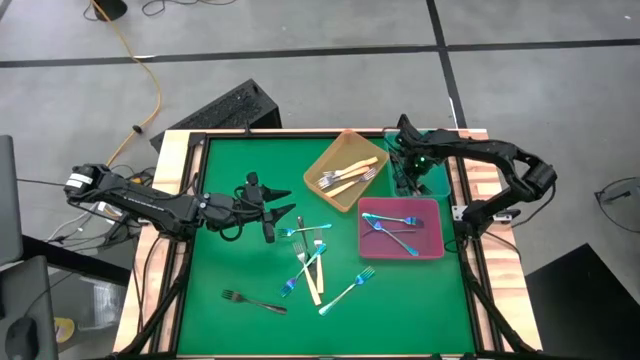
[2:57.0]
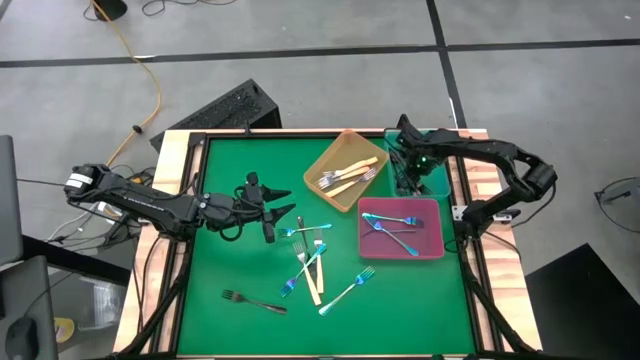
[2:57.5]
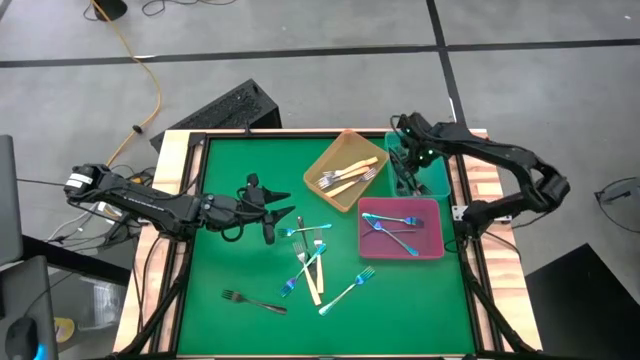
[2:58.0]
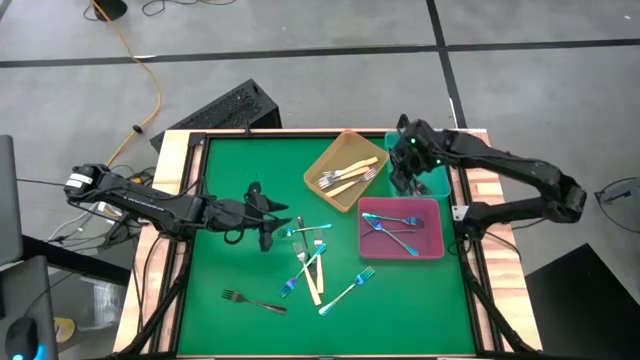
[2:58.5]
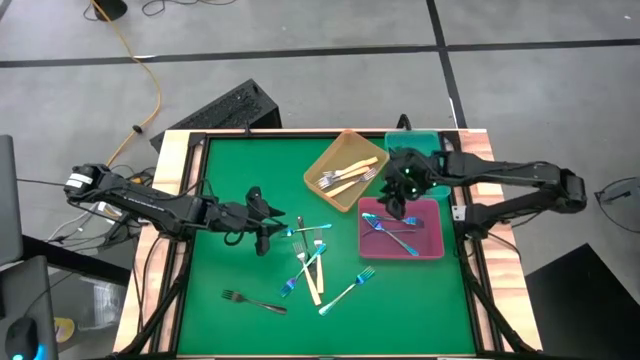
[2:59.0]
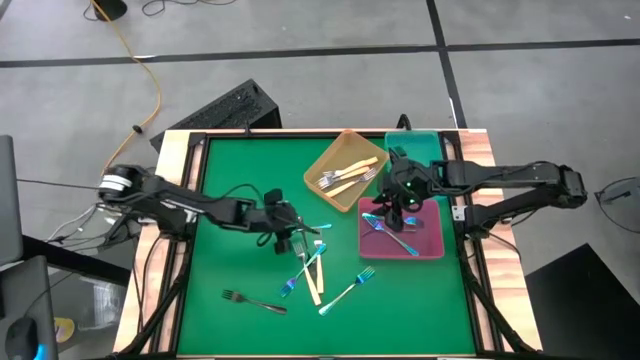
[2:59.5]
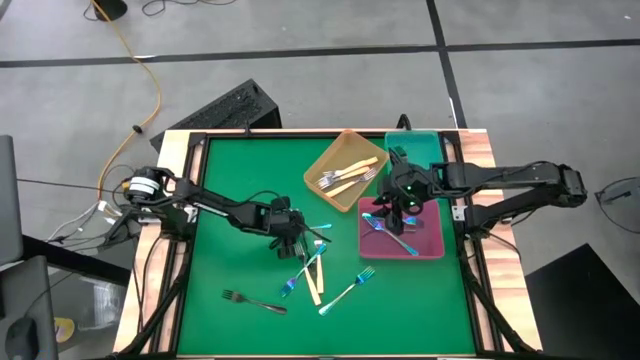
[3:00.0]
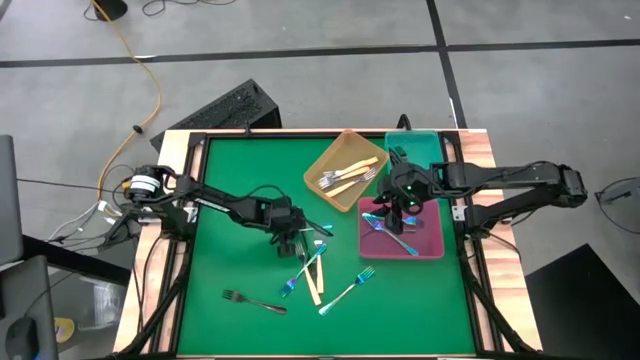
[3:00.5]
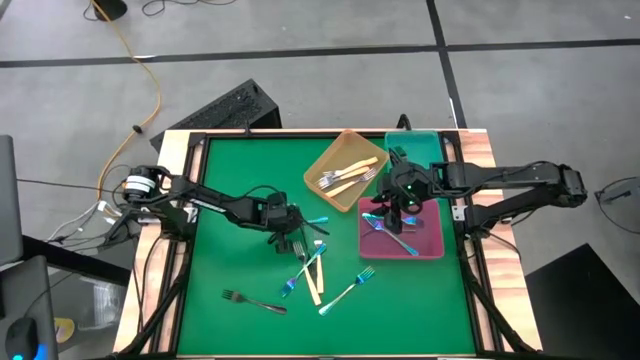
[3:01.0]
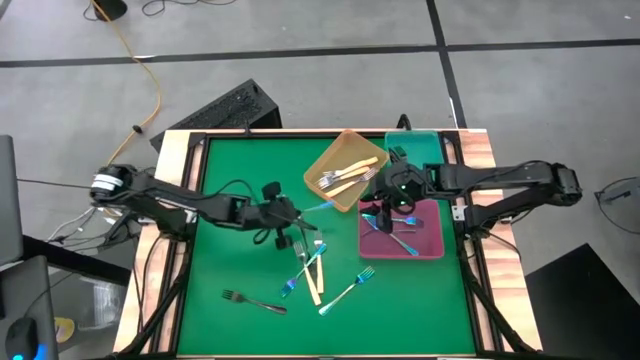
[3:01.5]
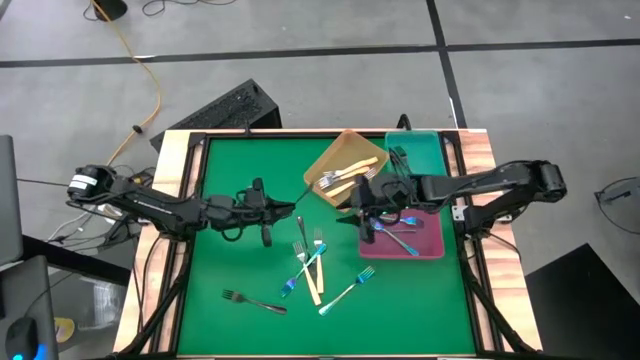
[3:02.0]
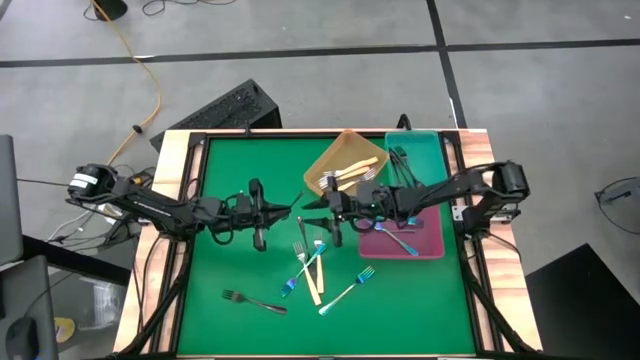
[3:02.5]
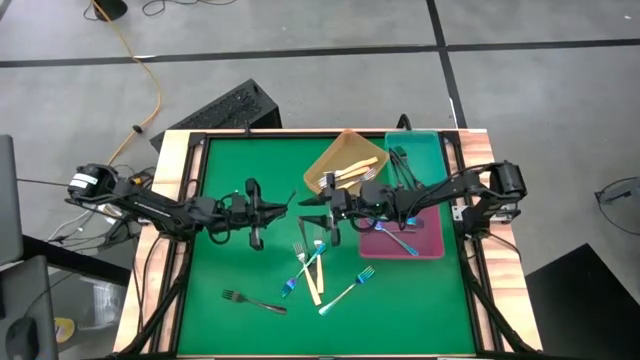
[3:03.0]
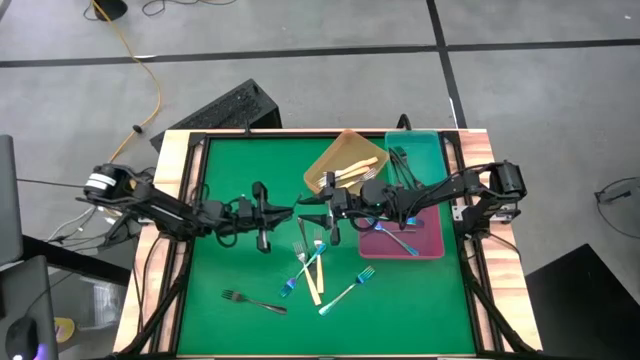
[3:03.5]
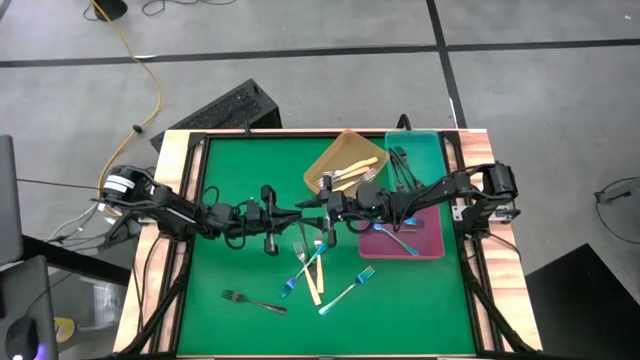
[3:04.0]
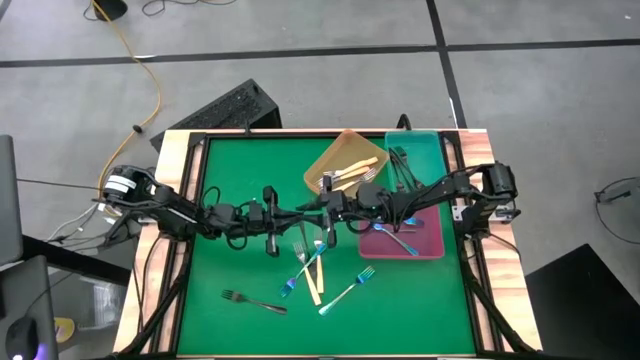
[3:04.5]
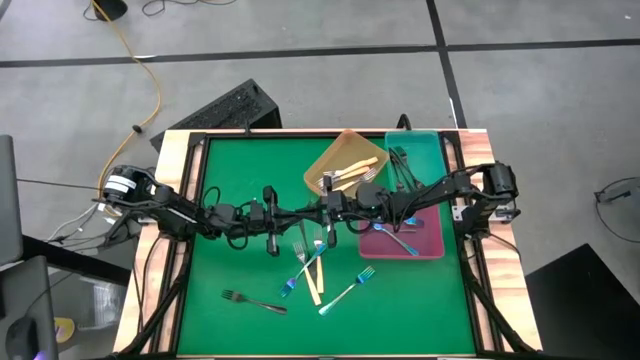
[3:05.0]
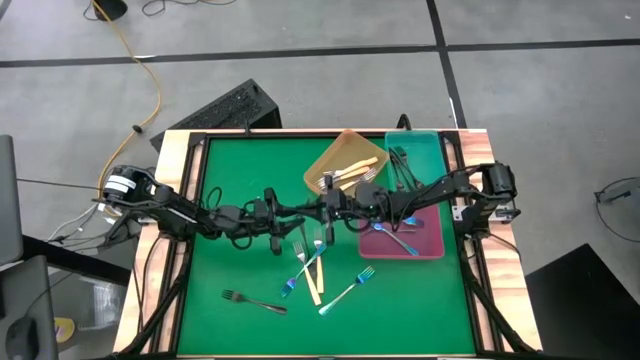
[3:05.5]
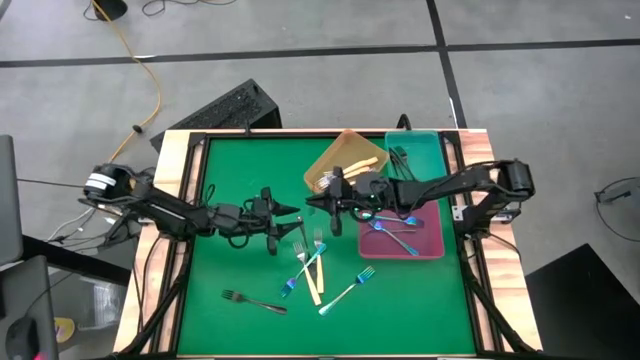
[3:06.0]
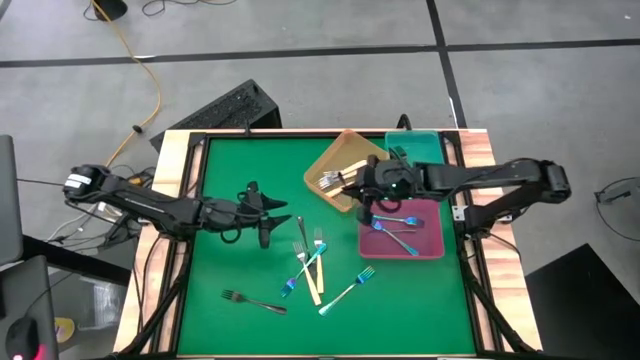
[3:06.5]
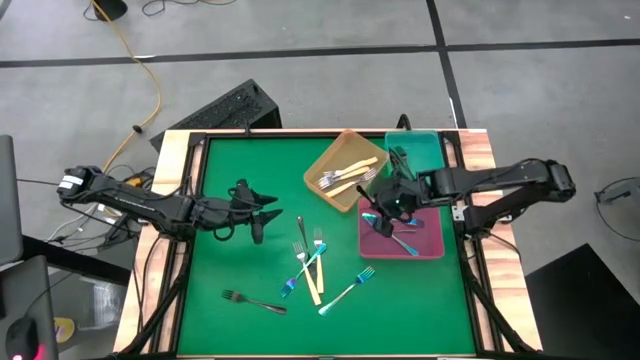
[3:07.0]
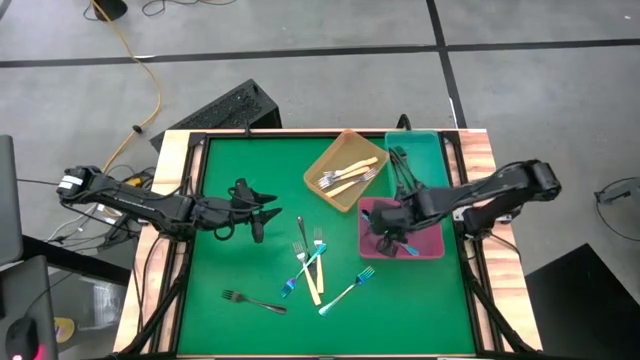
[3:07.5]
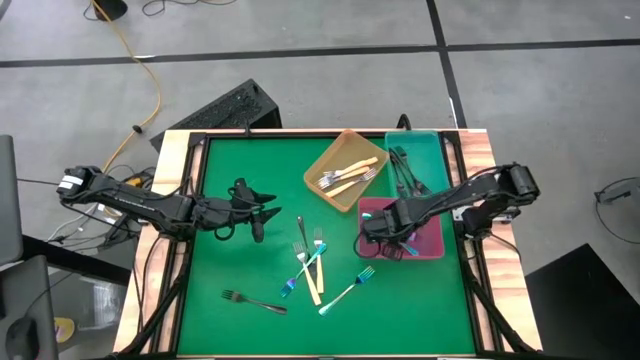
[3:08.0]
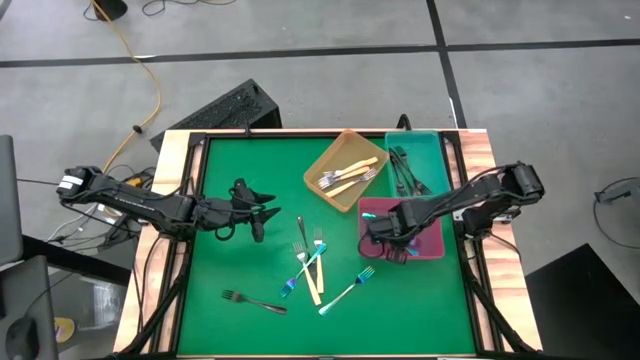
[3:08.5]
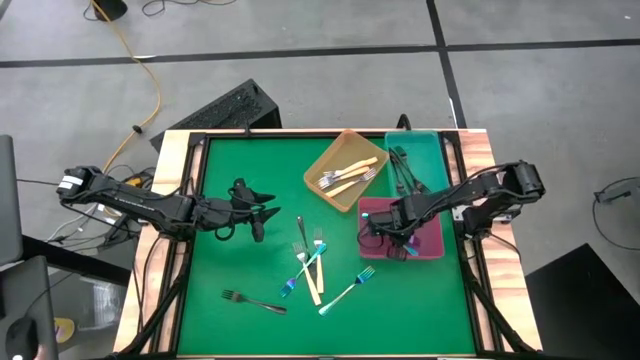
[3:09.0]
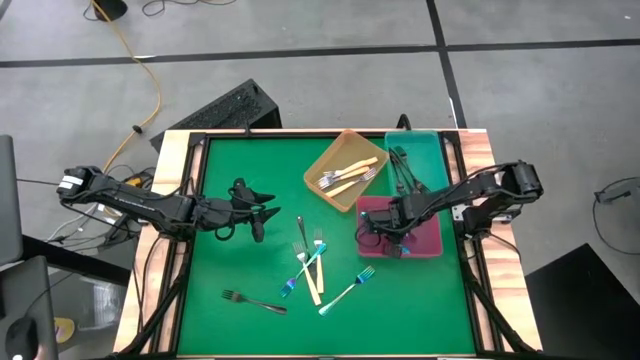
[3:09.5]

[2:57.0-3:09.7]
Task: Sort silverware by color (type)
Put the blue fork into the pink bin

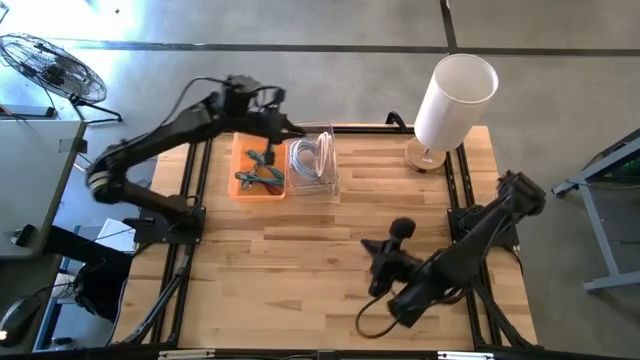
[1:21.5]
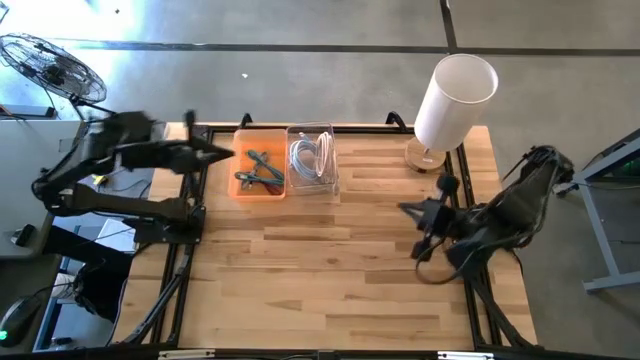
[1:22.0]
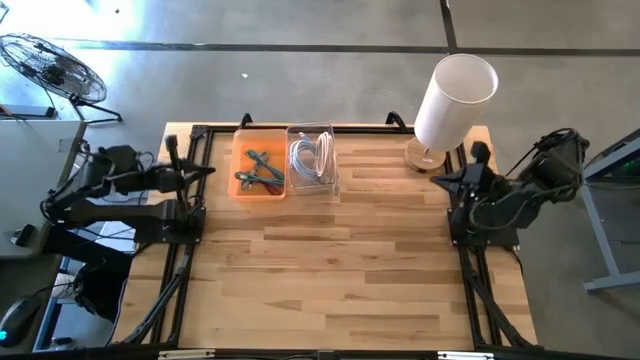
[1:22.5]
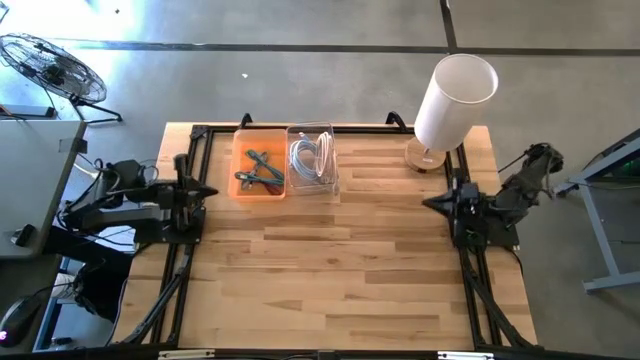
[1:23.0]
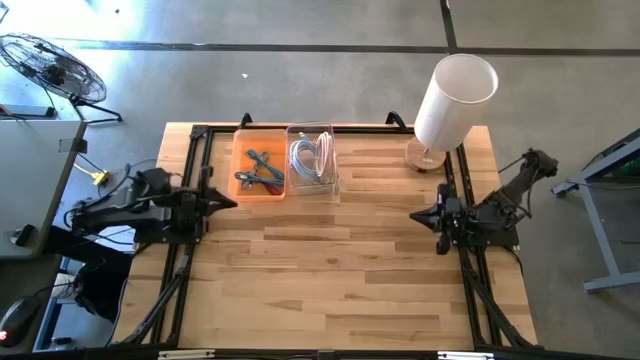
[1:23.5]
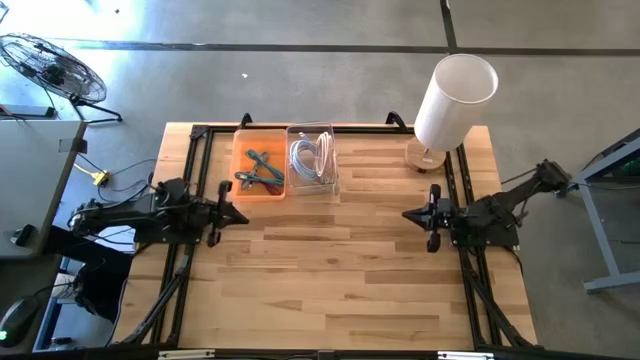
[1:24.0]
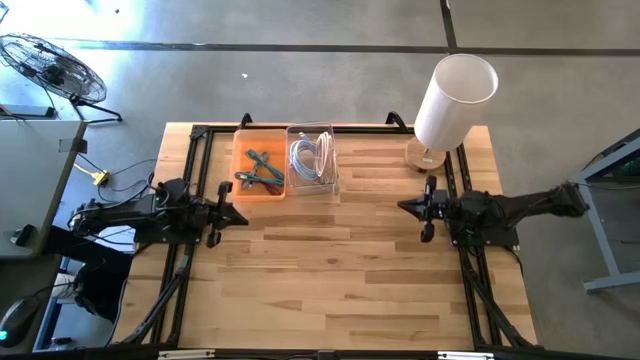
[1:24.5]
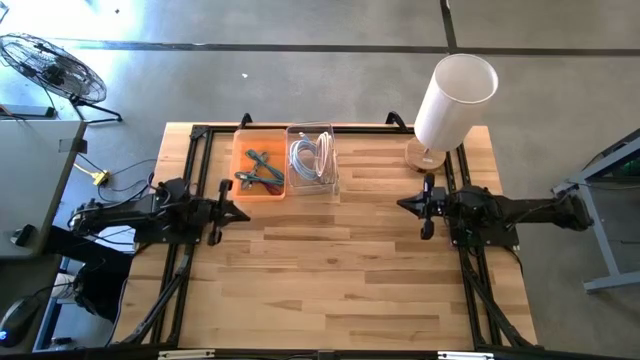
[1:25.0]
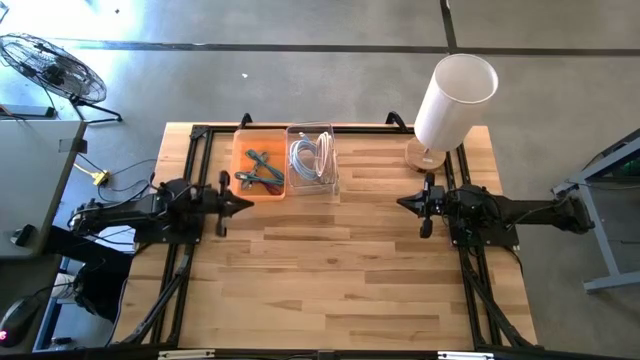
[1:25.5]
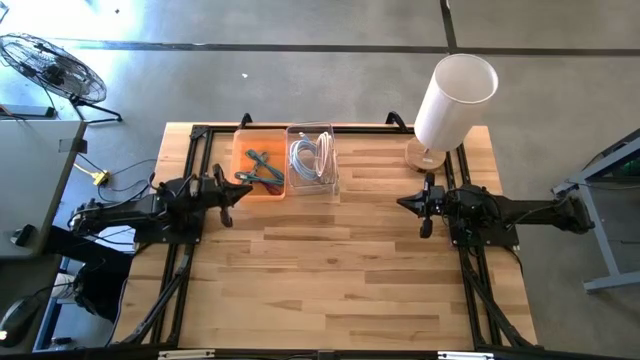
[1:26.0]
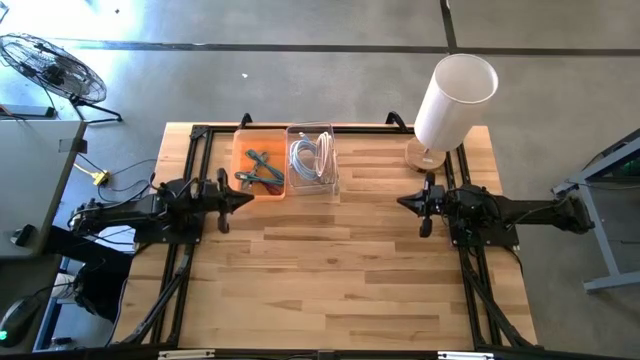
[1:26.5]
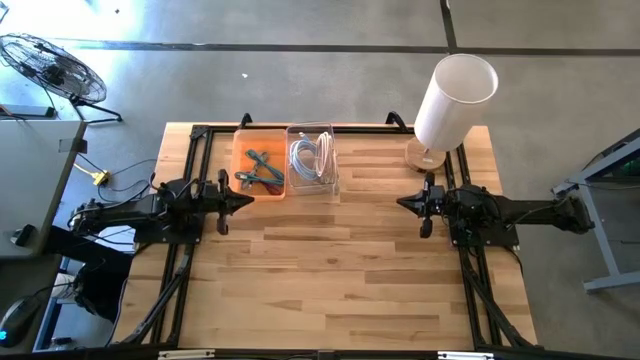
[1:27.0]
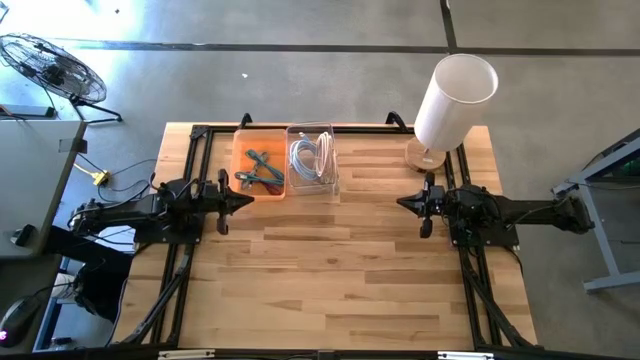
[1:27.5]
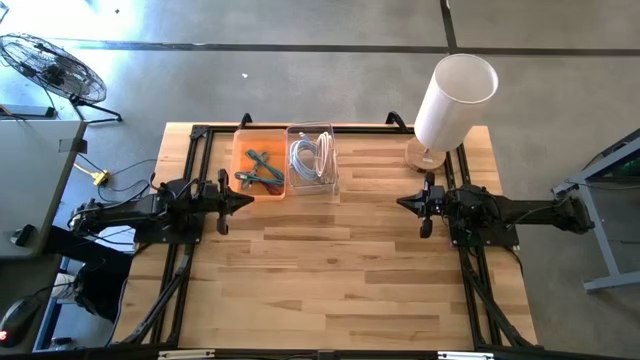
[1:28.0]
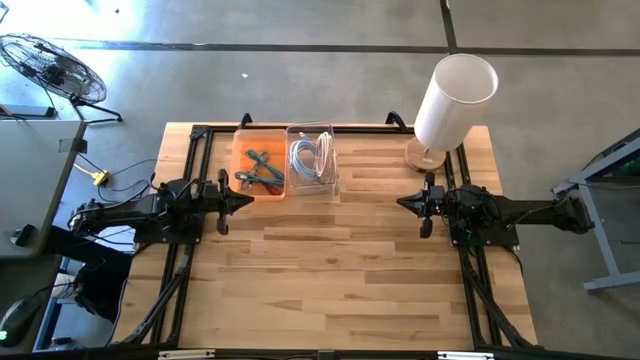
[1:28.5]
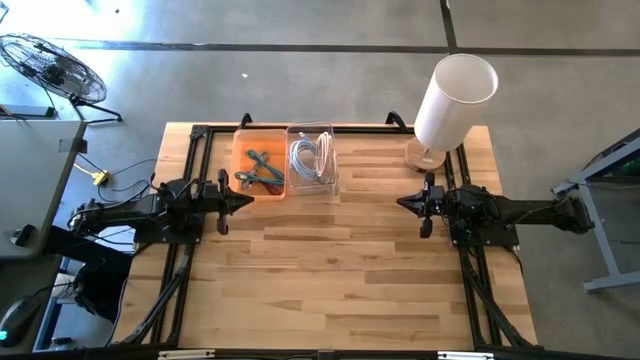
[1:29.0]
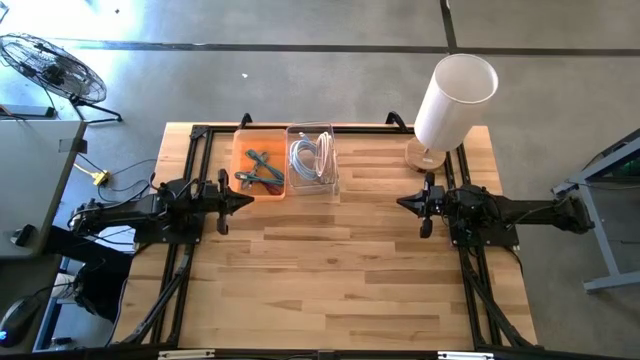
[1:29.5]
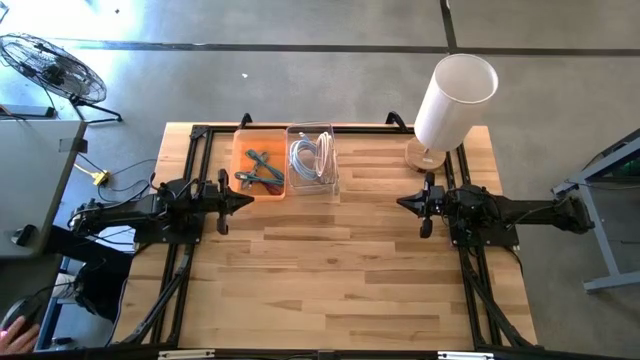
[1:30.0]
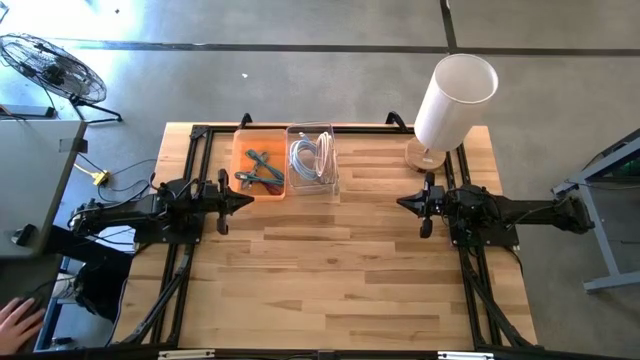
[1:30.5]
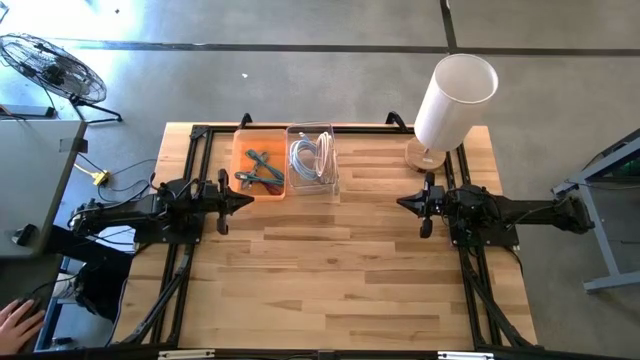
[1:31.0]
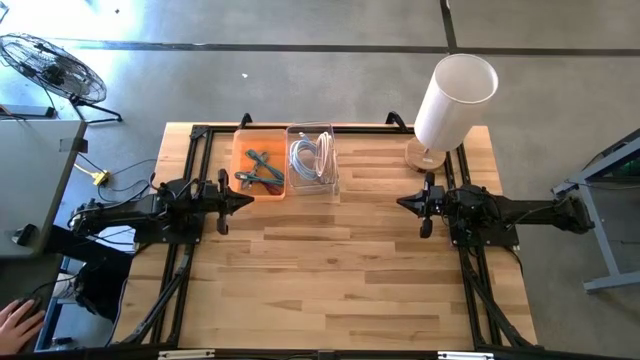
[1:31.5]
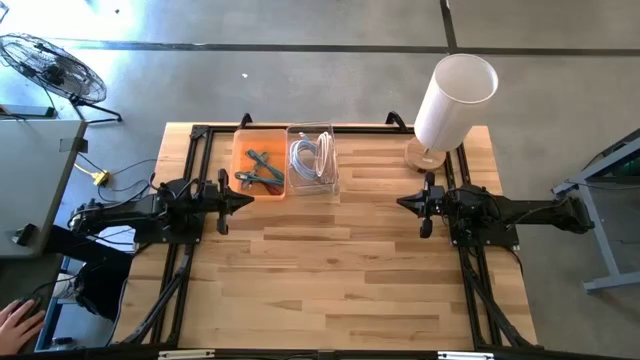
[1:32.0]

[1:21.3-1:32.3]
Task: Pick & Place USB Port
Return to Home Position
